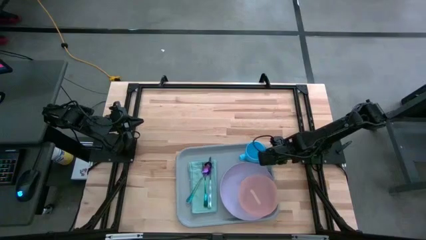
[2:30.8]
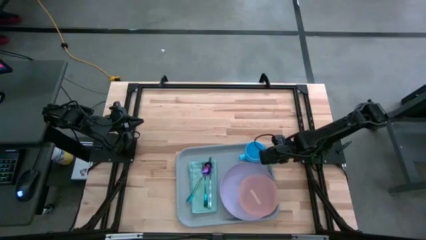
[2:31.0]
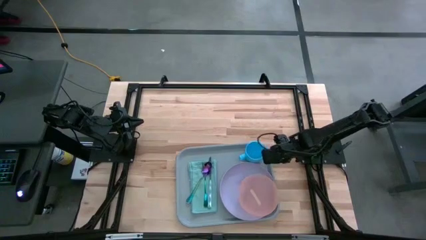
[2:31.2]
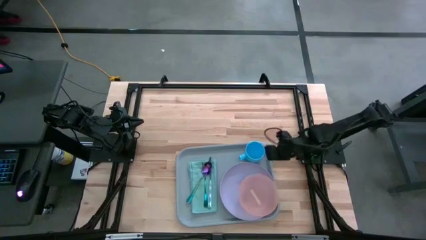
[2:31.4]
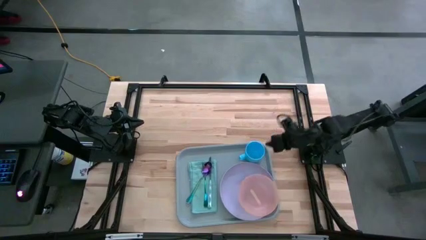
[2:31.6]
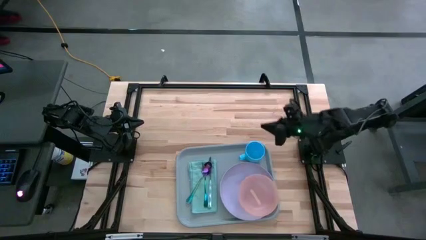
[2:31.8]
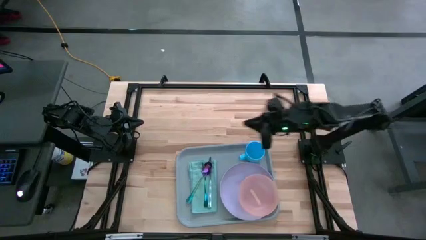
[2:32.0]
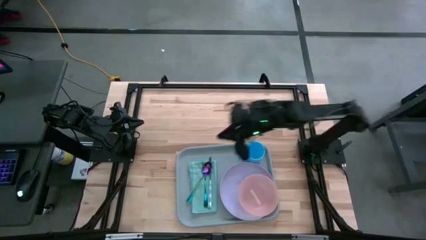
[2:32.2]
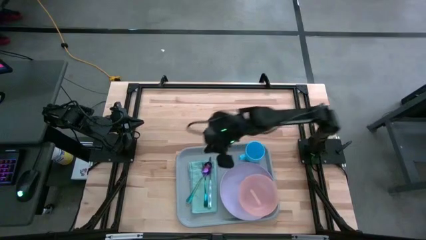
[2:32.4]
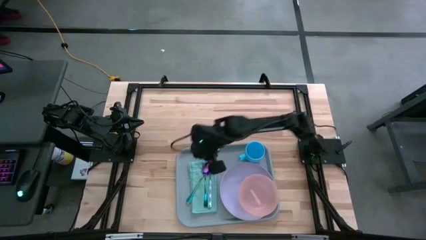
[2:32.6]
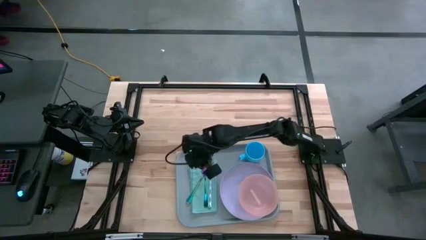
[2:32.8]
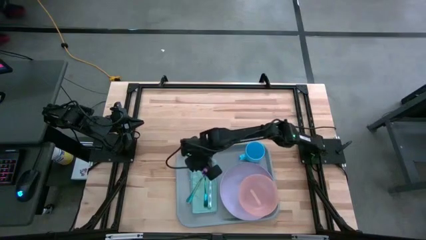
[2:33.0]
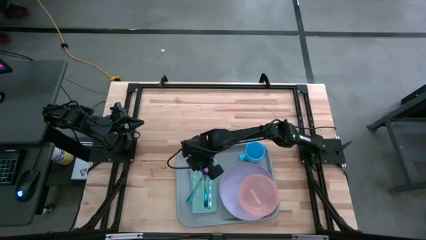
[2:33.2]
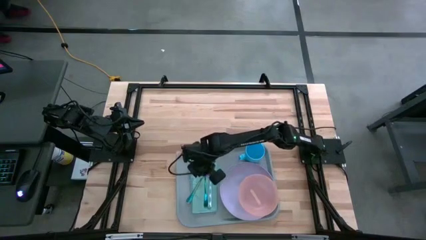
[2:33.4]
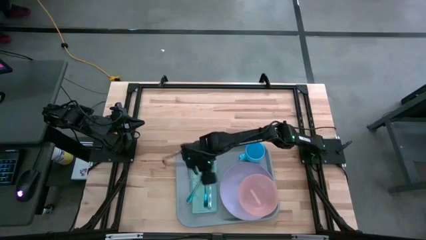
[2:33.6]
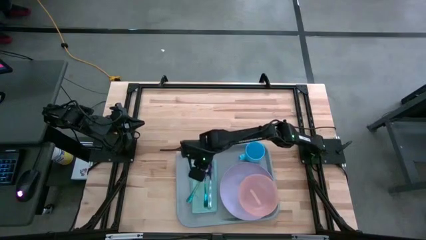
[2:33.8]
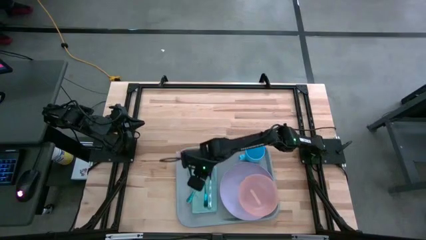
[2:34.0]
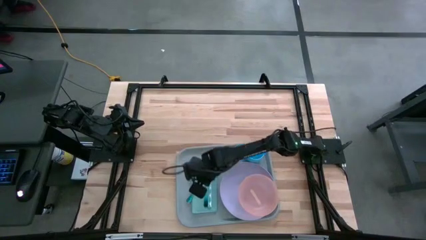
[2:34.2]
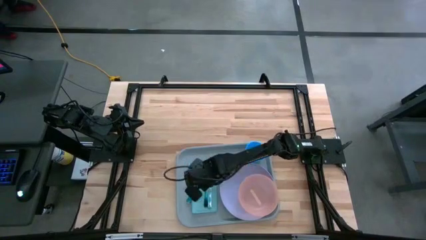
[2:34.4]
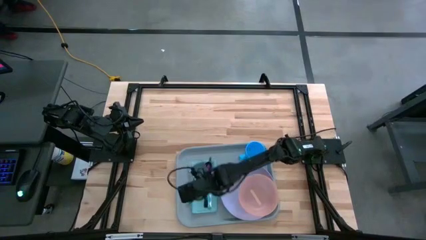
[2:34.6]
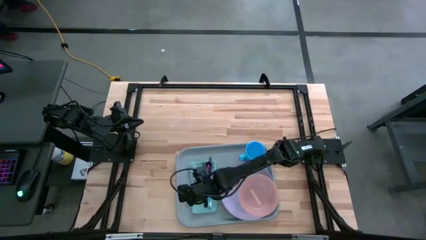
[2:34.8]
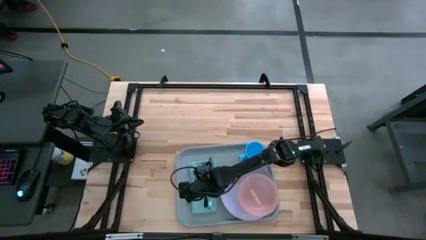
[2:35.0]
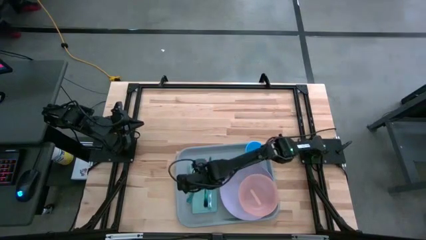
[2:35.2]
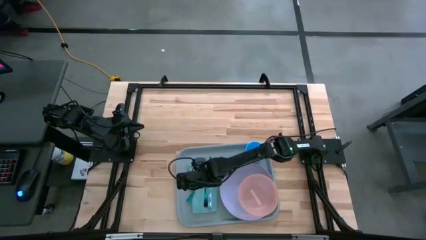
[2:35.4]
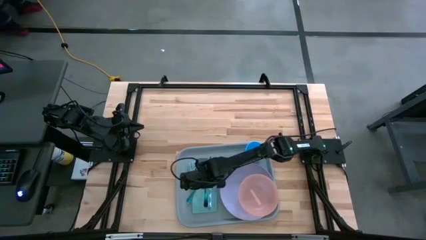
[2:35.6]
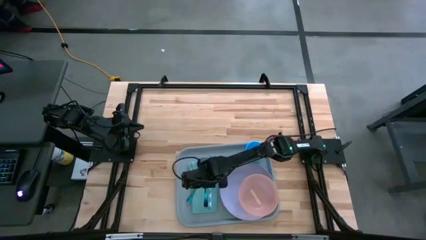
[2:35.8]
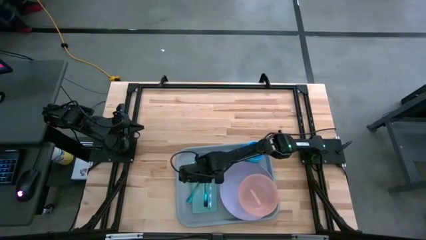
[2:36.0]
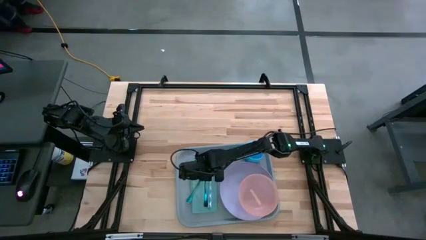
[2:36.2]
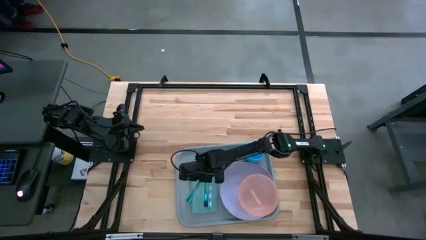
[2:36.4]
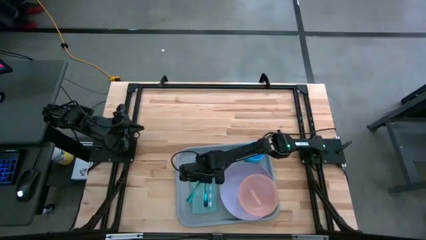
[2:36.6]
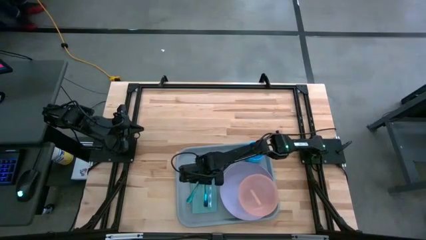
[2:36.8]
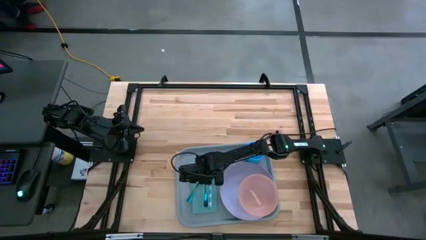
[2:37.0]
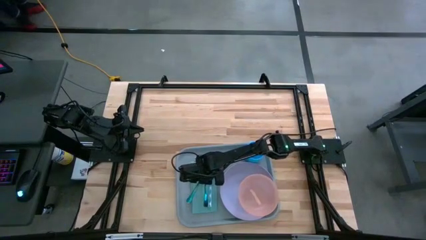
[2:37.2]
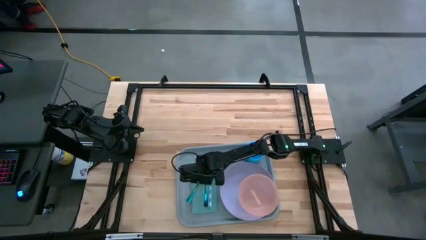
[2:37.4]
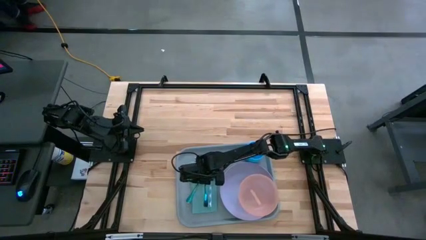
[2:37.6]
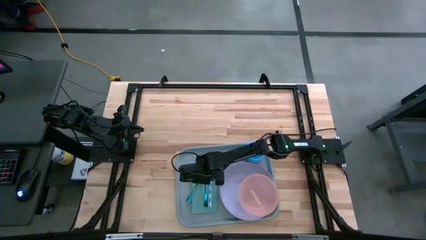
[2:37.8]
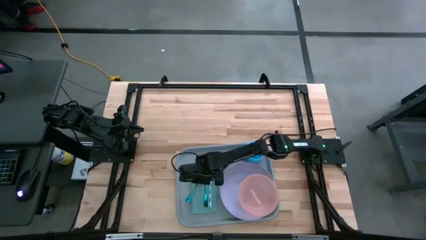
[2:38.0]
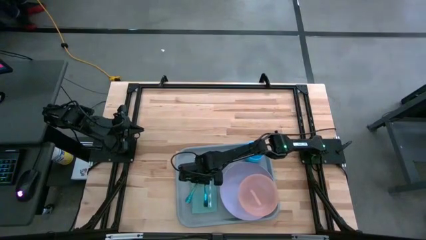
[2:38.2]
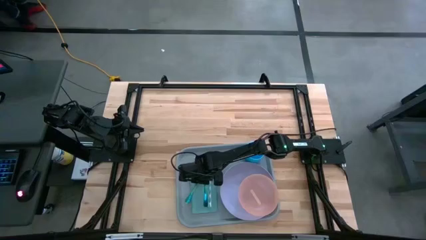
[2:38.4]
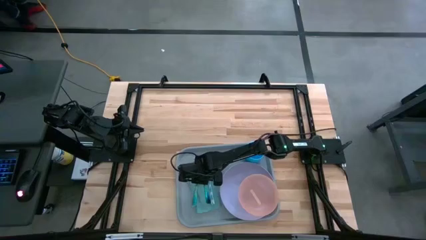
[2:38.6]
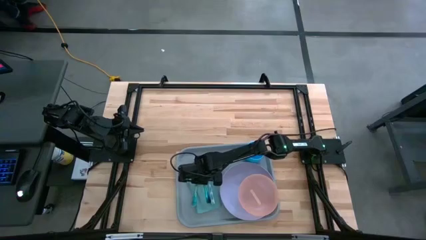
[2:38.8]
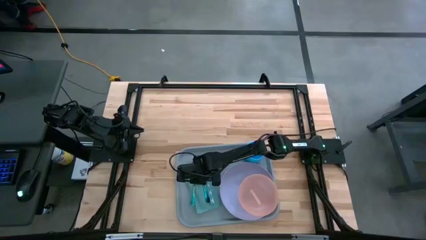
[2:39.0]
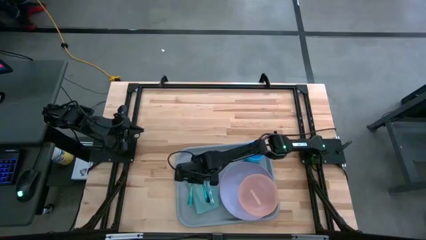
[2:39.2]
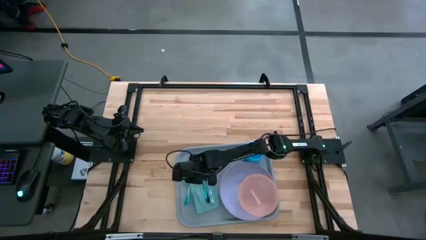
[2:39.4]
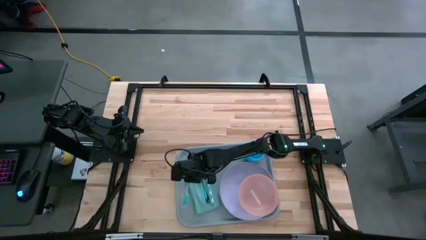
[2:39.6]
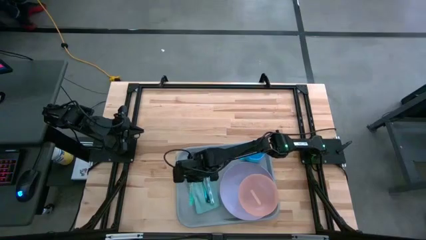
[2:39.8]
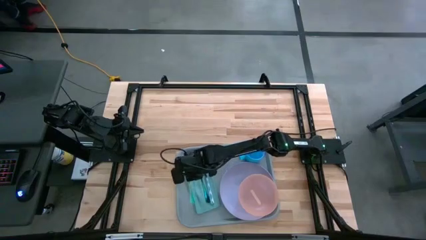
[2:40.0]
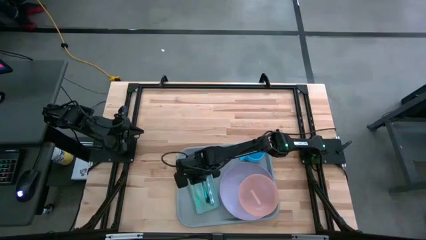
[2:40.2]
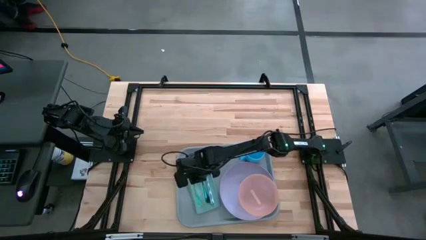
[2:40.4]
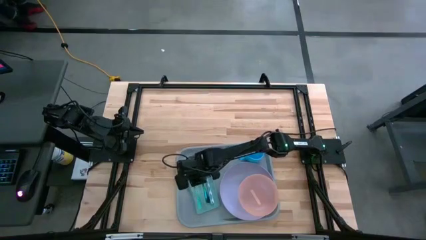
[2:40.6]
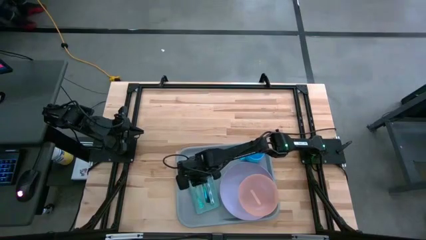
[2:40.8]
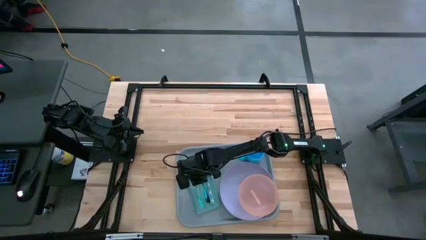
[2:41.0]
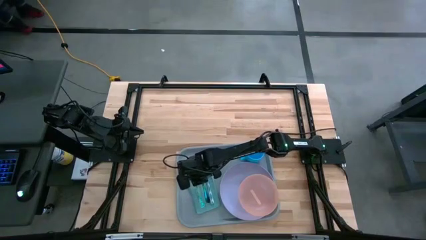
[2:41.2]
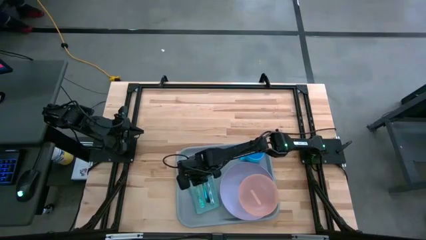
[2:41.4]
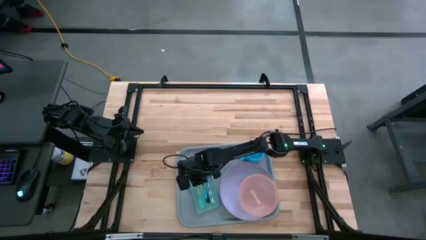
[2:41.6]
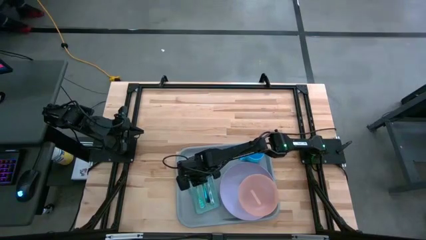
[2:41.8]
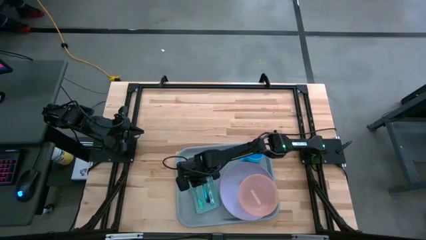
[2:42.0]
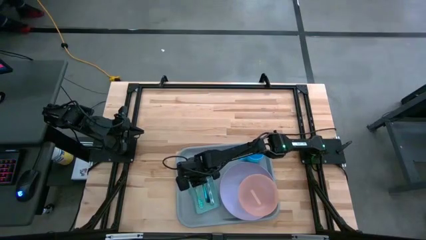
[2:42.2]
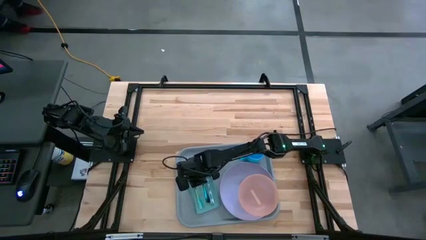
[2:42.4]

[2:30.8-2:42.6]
Task: Set up tray
Adjust the purple spoon on the blue napkin

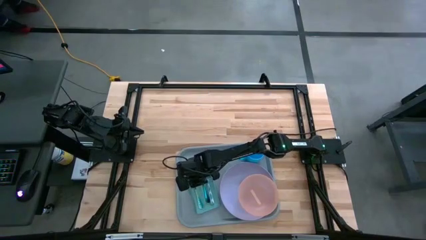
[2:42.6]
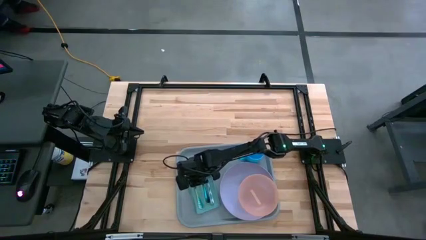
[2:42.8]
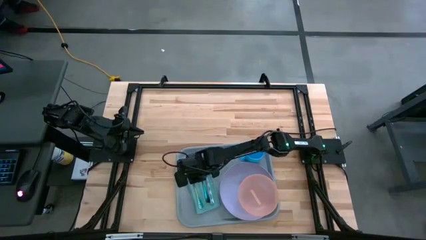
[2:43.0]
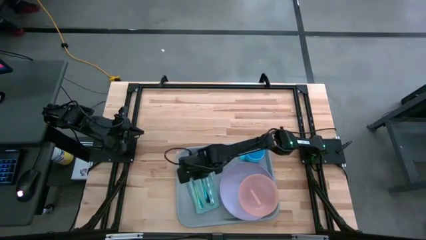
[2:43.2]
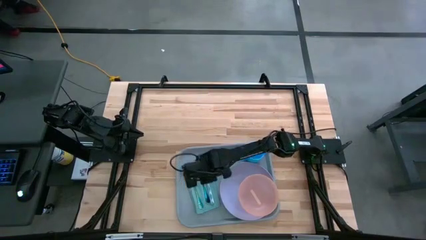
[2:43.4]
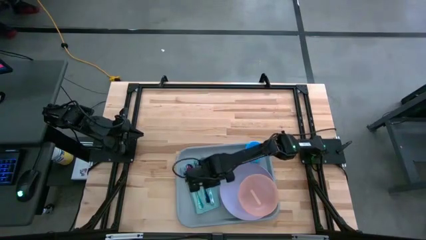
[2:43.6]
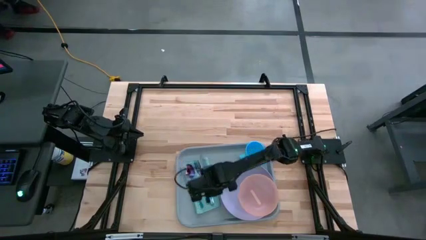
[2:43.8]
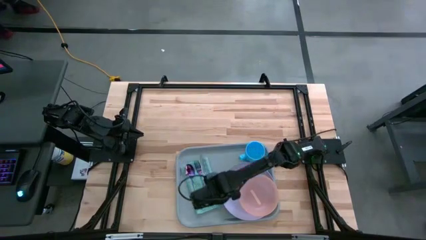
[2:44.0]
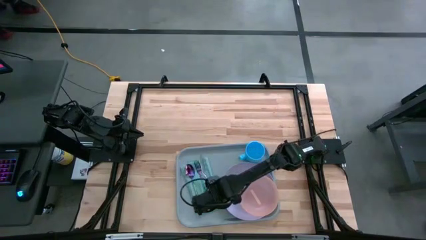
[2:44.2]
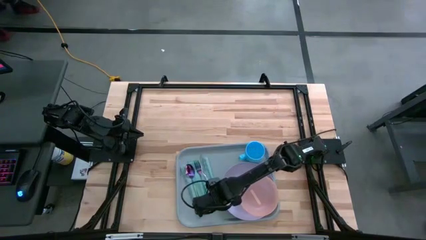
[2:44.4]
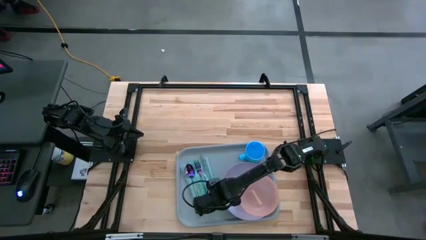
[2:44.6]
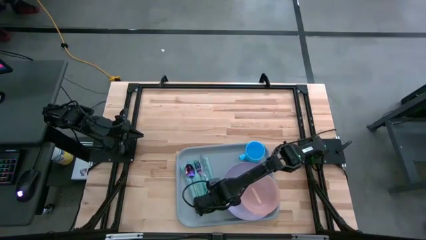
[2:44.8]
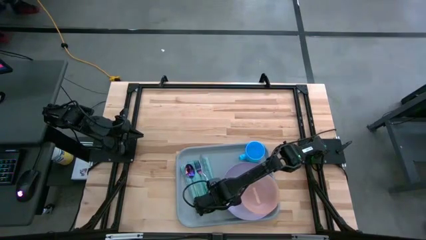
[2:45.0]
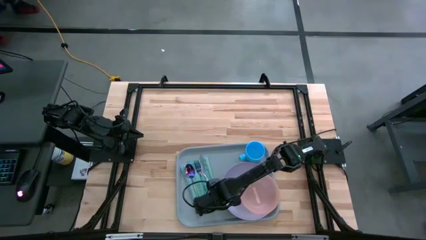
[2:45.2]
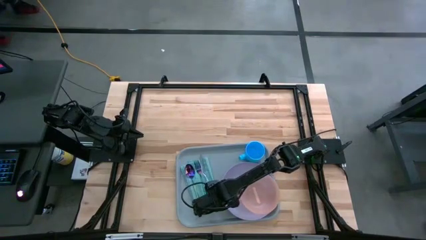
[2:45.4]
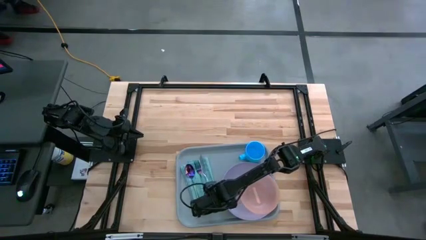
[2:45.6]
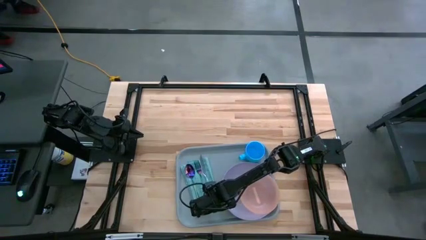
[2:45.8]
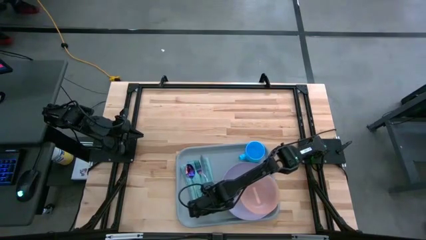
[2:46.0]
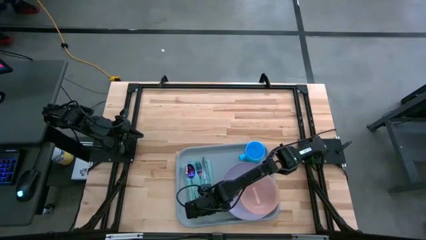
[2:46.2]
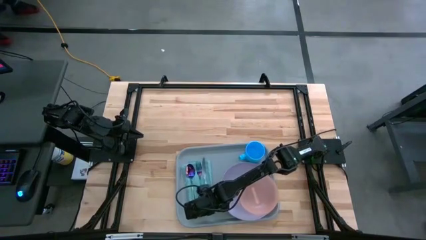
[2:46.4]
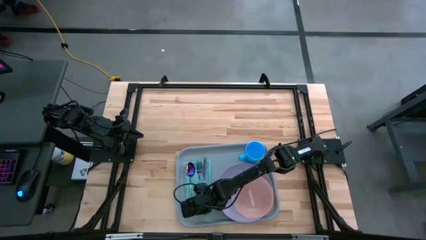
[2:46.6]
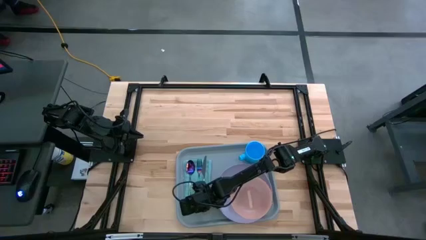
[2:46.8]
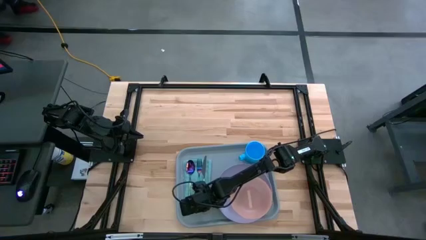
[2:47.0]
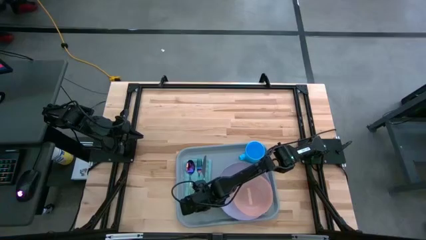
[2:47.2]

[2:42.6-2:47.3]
Adjust the blue napkin
